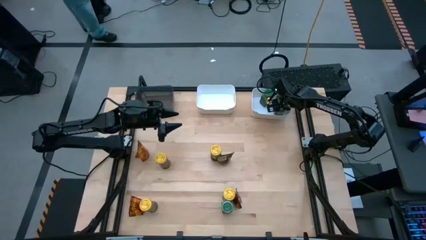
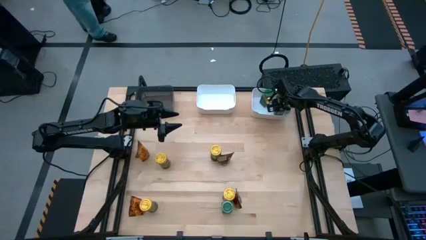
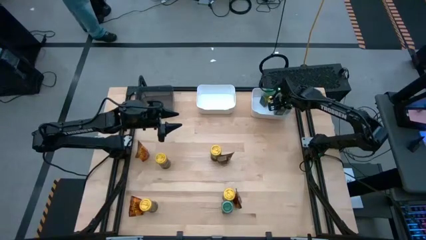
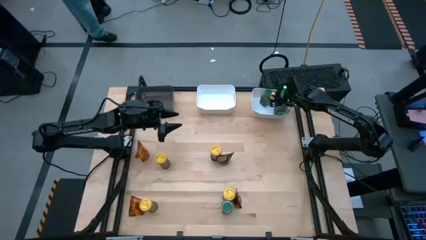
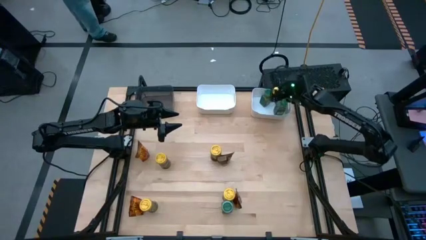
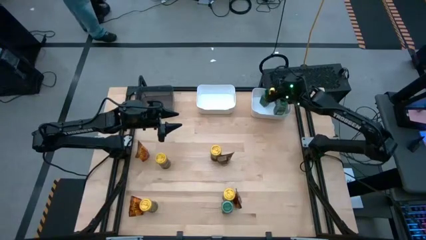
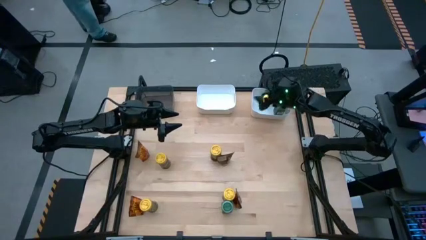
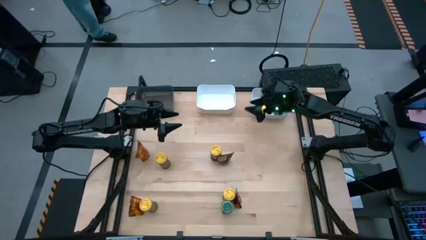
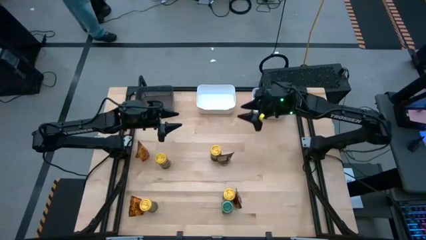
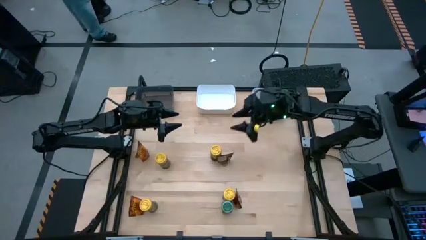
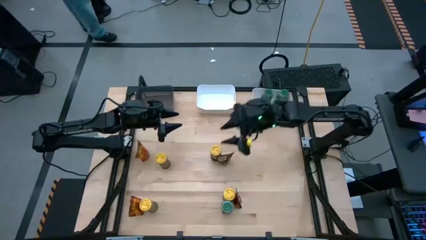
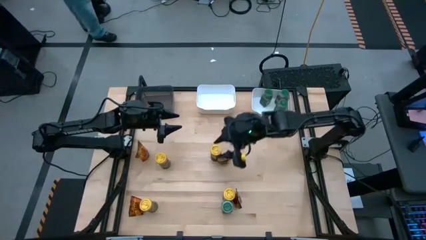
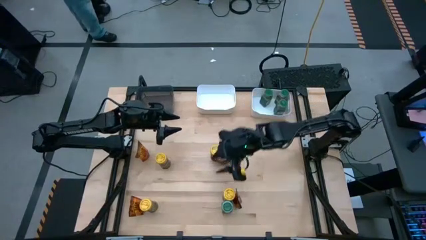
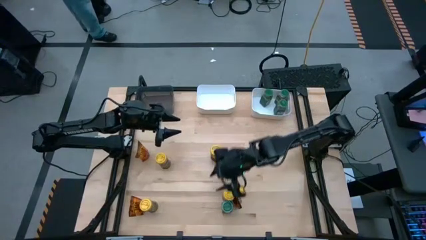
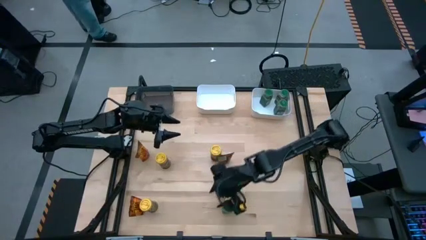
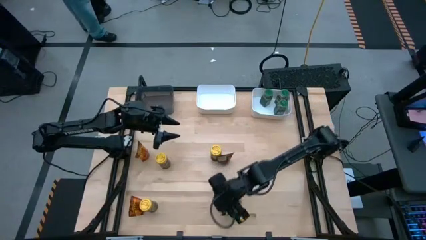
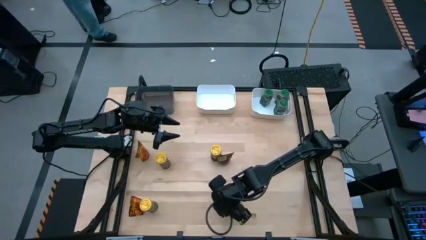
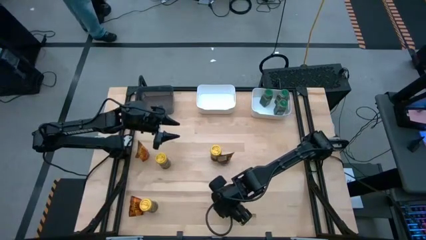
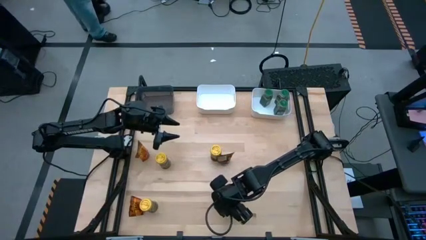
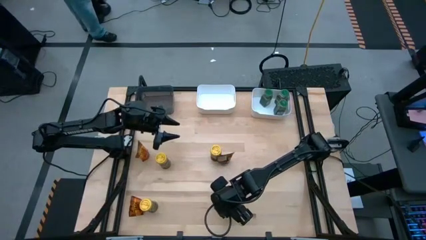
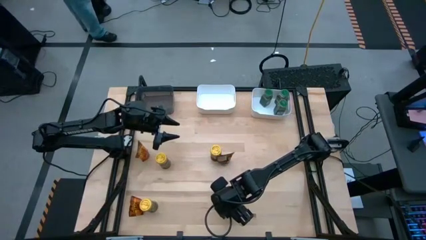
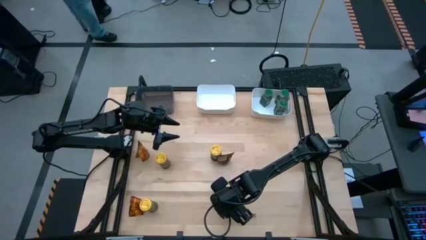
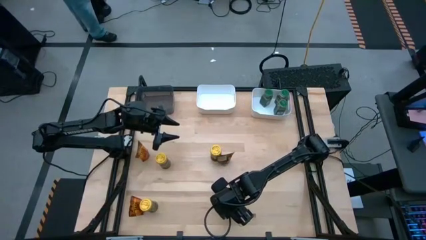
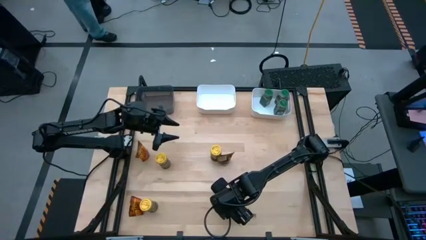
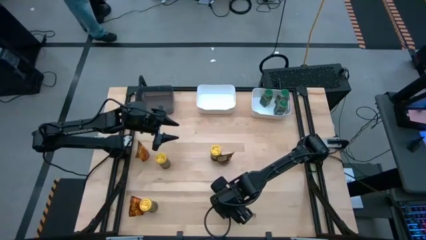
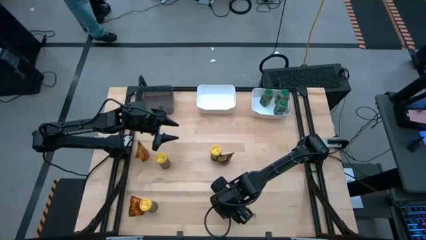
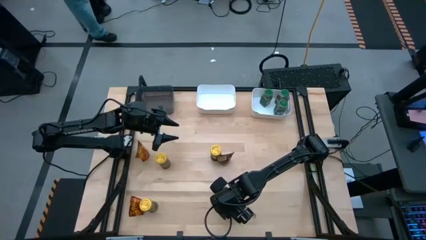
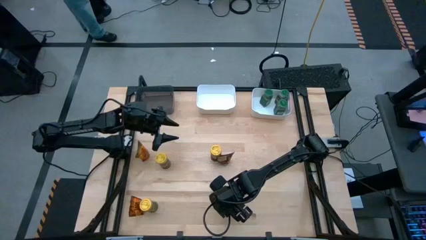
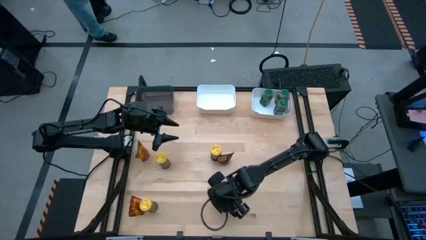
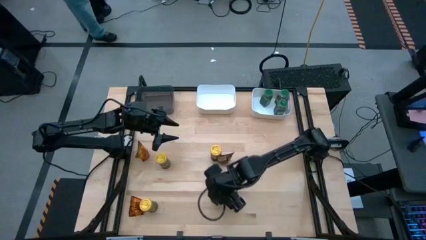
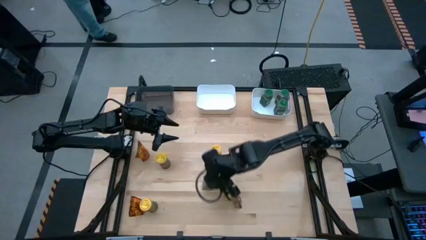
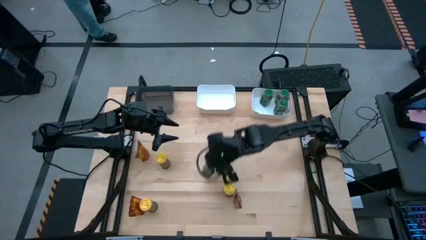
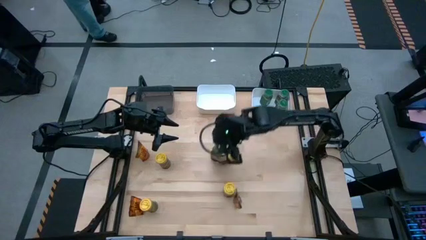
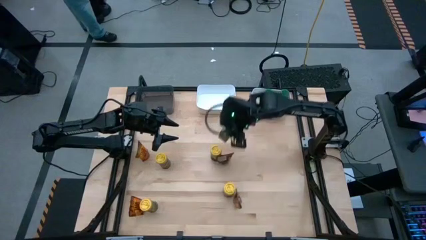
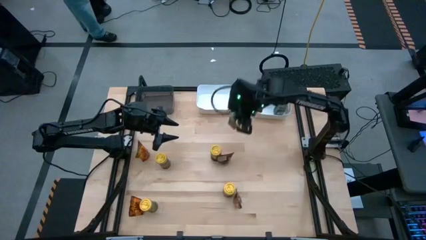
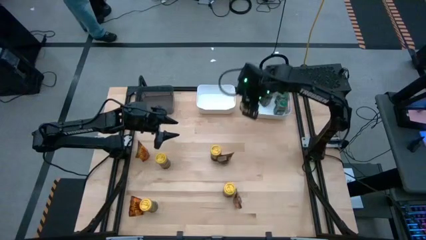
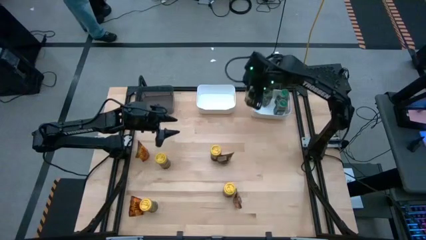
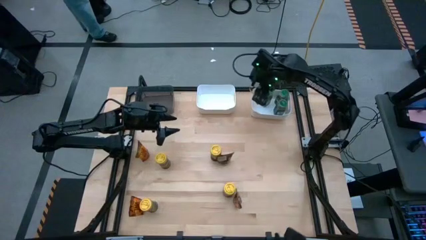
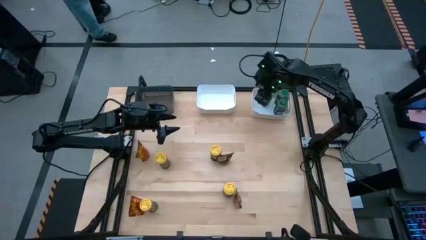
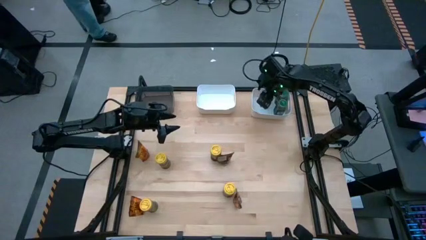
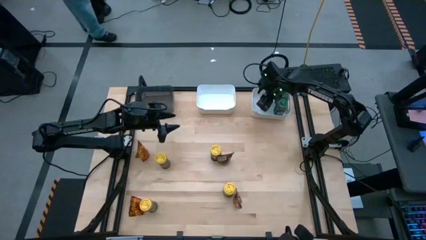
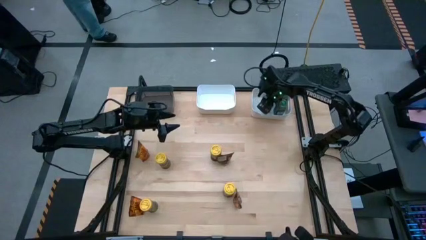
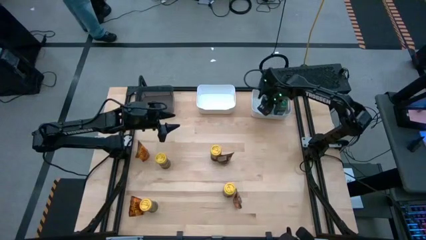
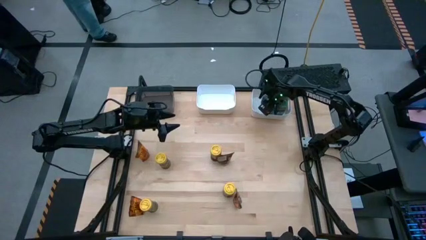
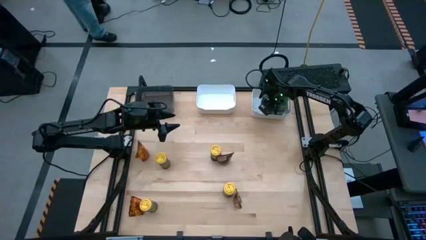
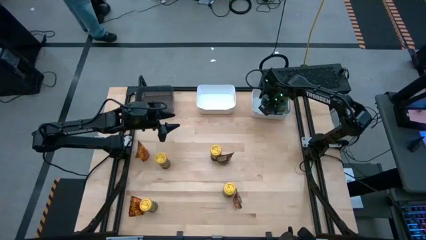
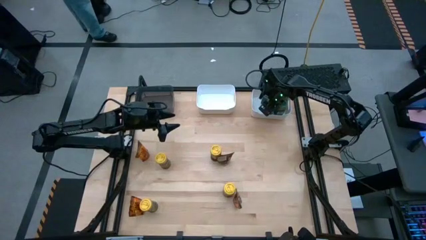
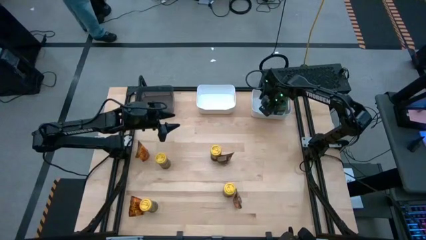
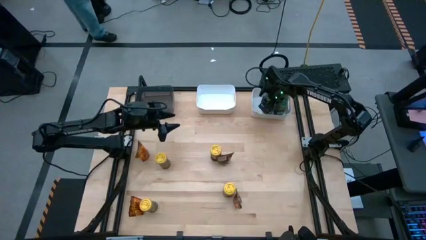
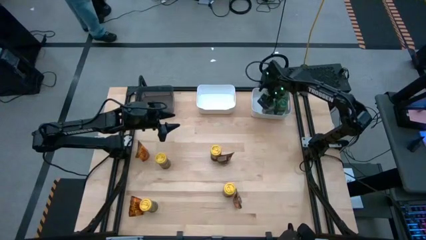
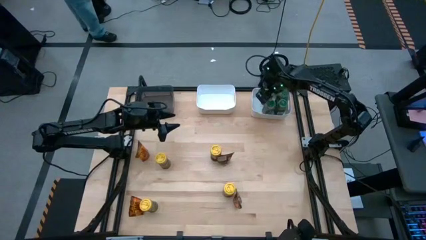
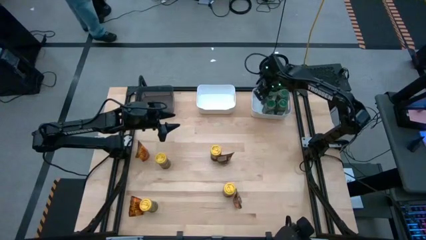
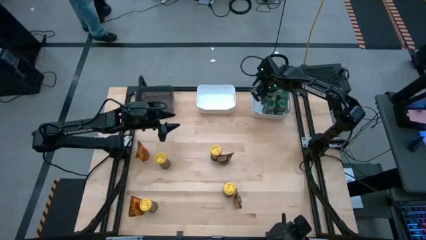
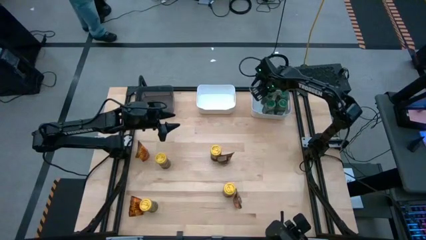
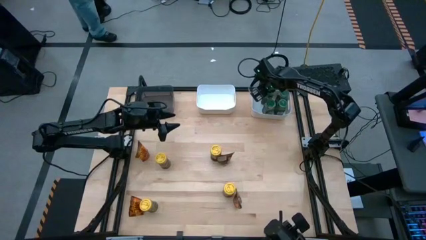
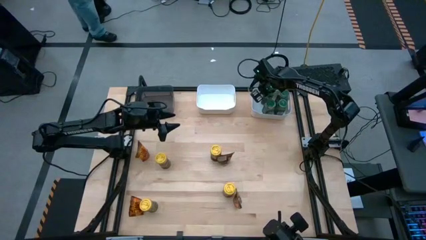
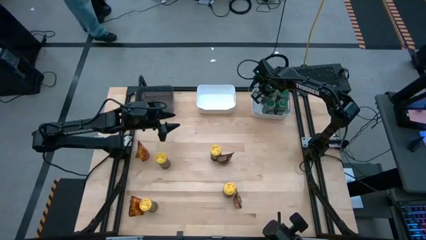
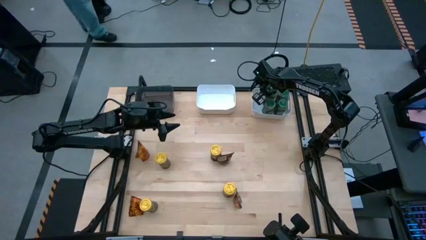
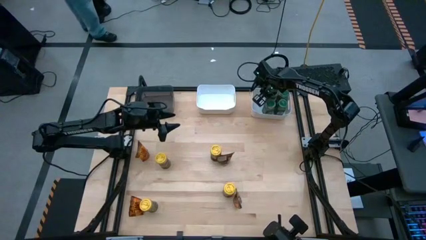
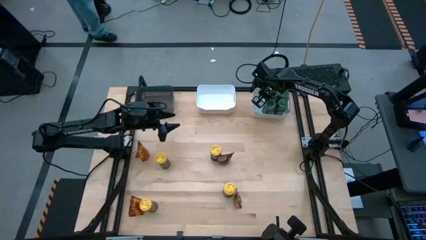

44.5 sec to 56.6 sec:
Task: Sort spices by type
Put the green seasoning bottle into the right white bin

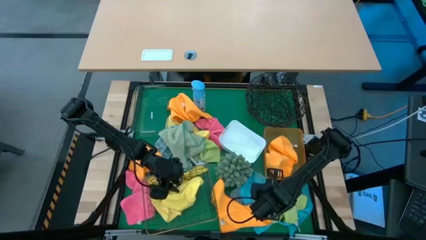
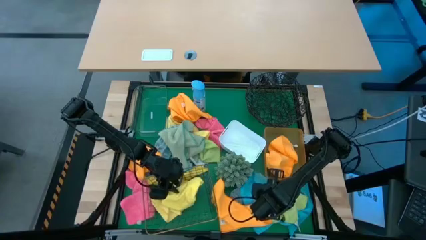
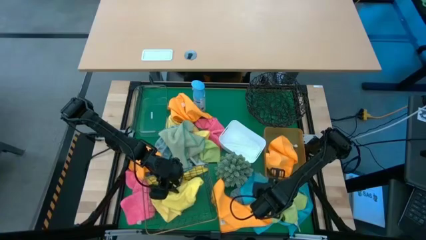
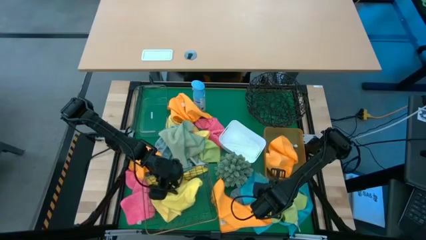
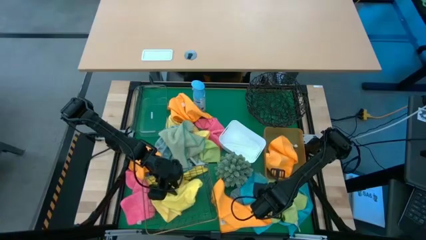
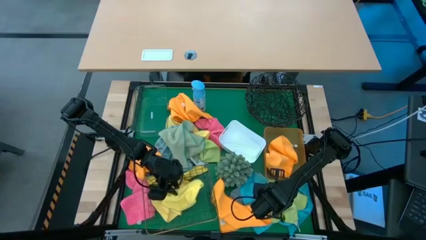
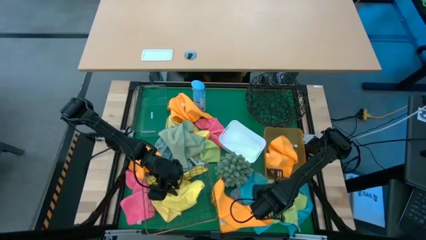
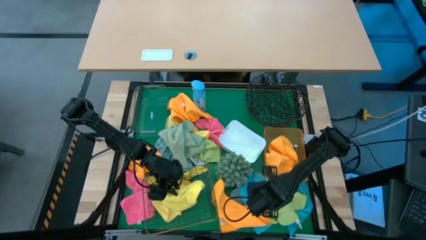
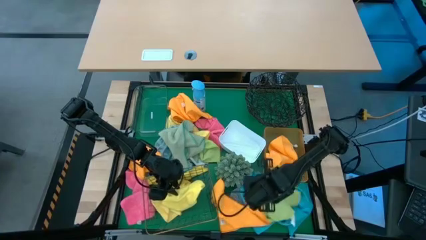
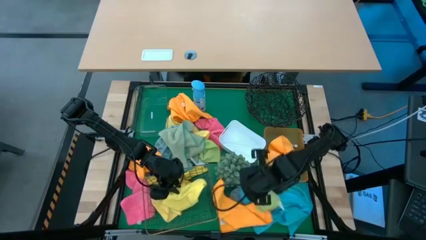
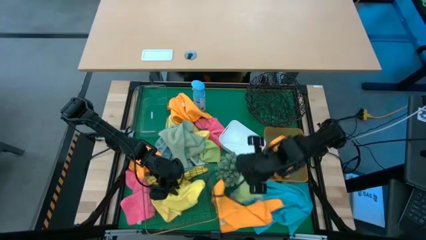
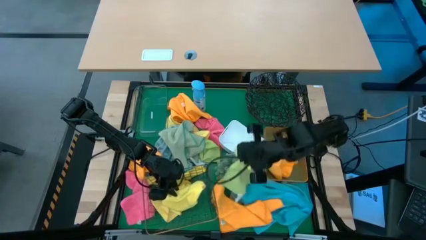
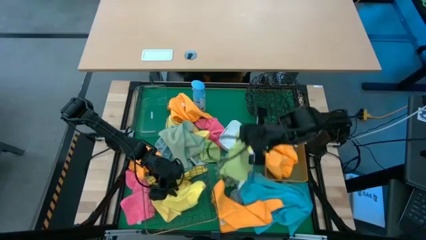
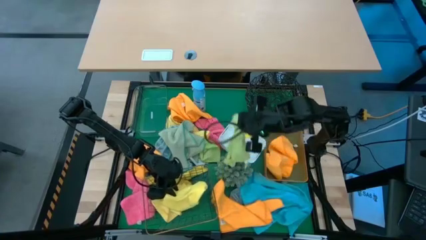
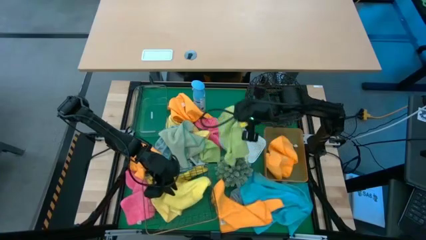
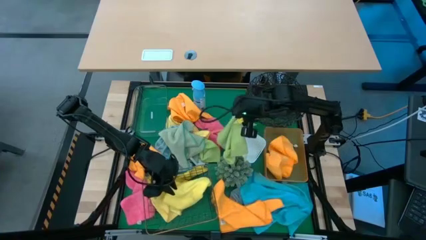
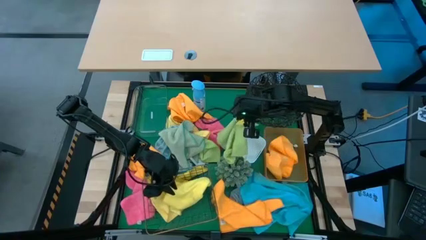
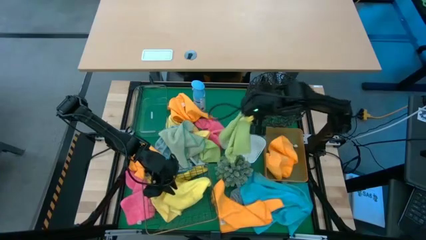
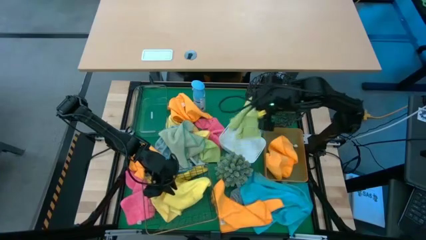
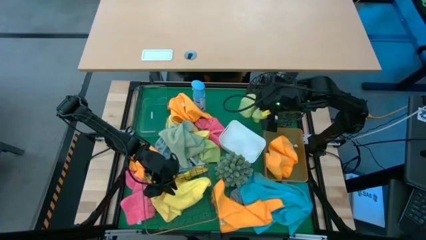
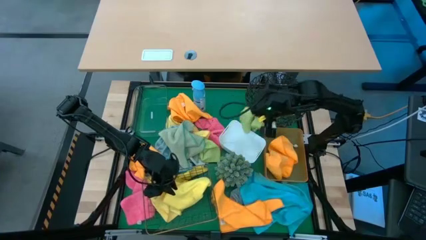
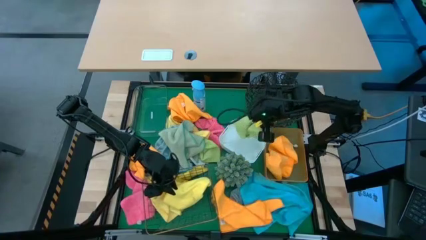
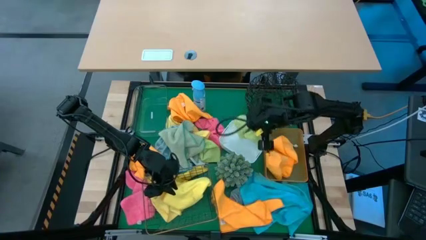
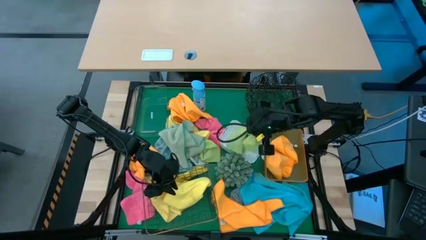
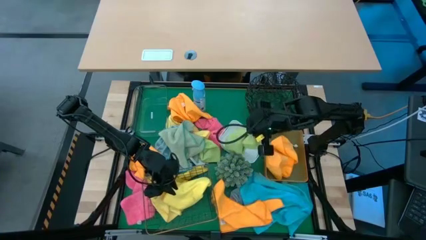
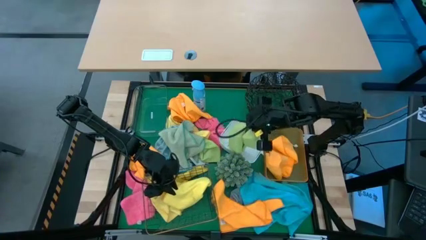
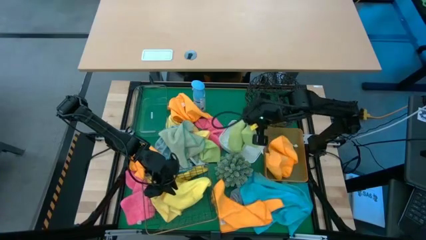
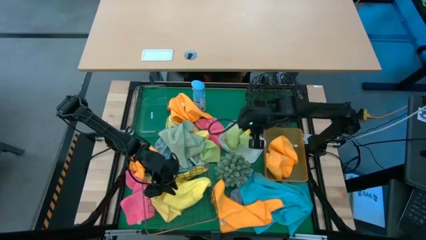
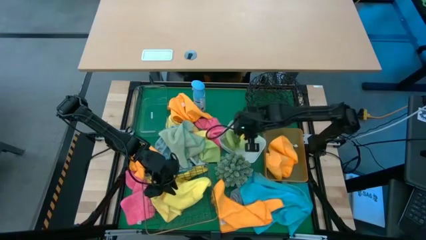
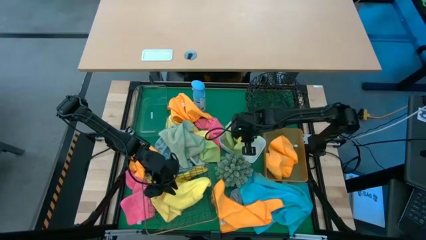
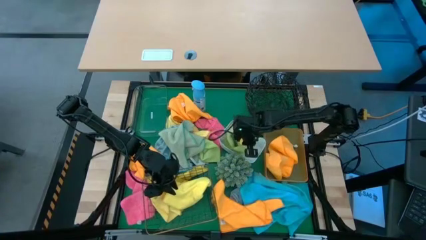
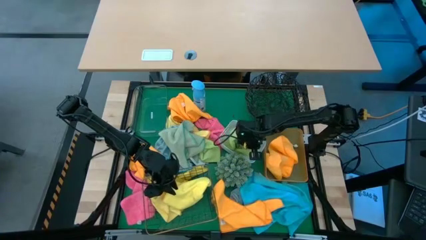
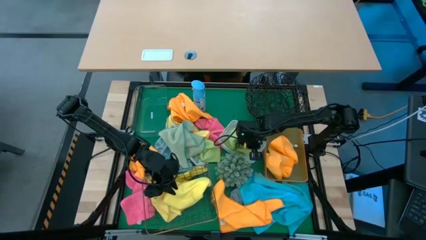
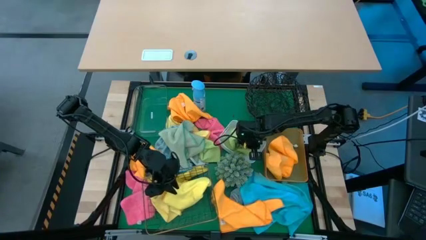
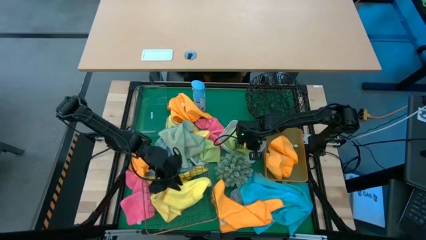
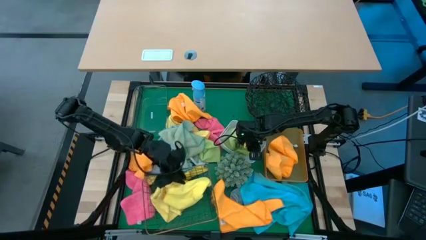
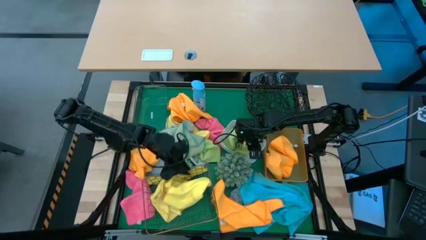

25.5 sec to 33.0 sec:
Task: Sort microfiber towel by color & place in baskets
Put the green microfiber cloth into the white bin
